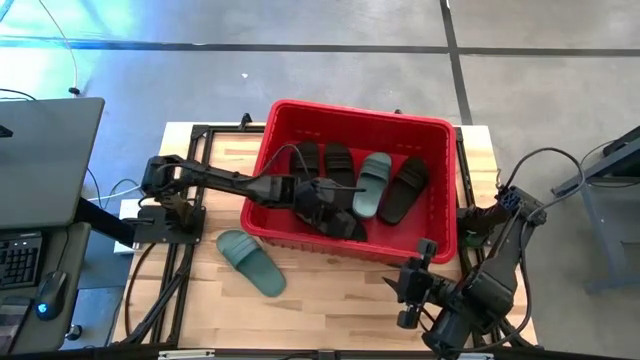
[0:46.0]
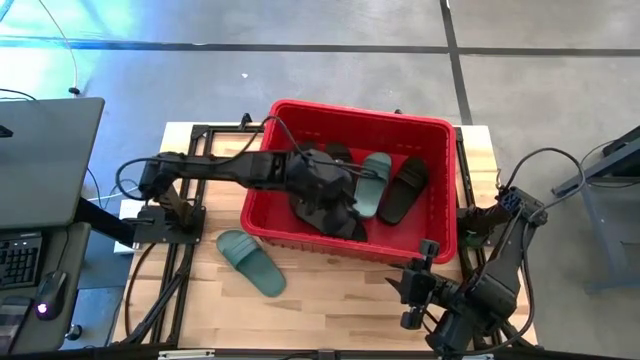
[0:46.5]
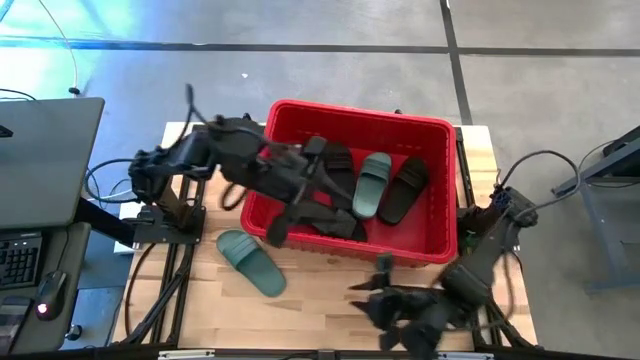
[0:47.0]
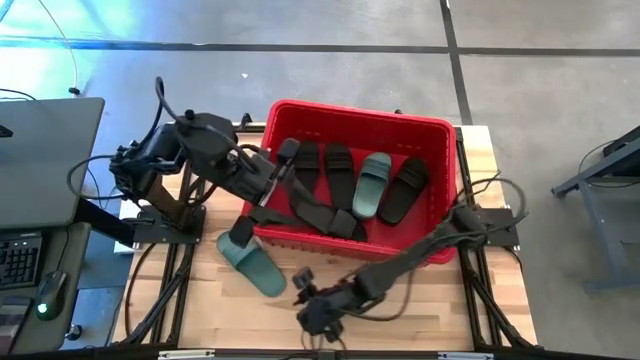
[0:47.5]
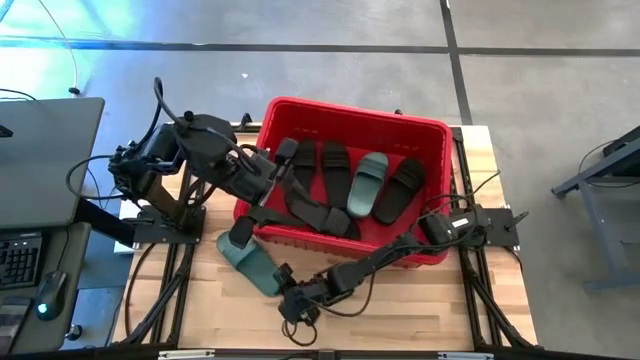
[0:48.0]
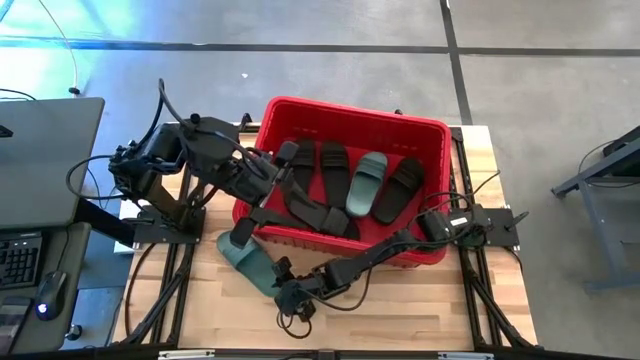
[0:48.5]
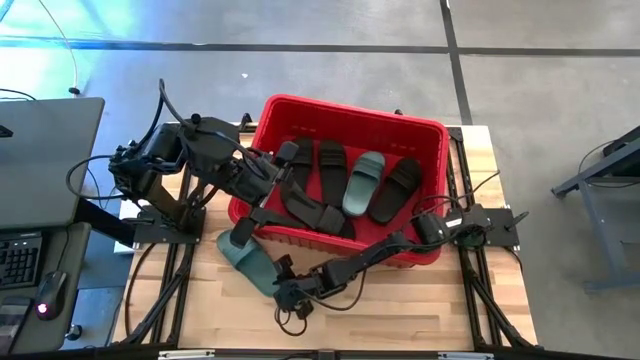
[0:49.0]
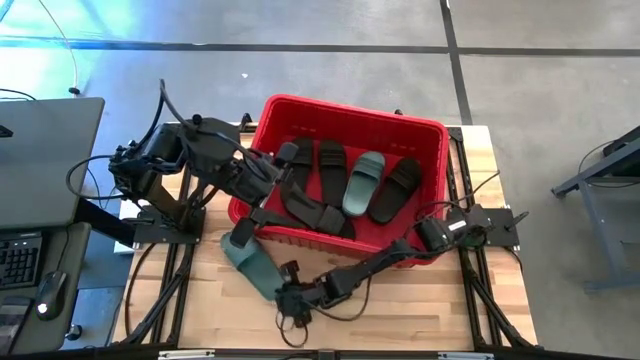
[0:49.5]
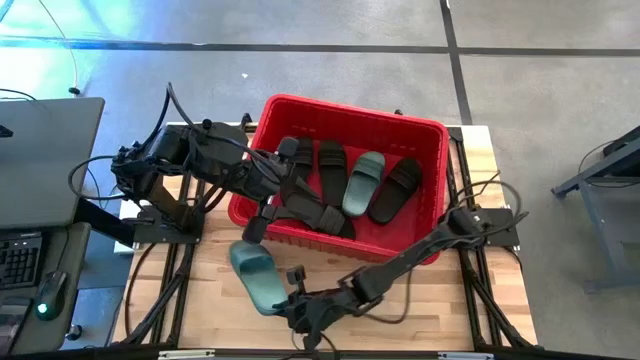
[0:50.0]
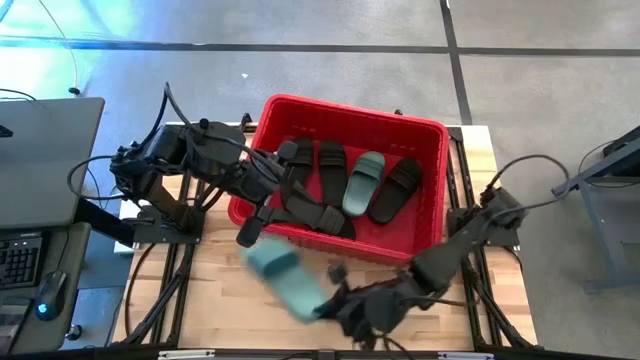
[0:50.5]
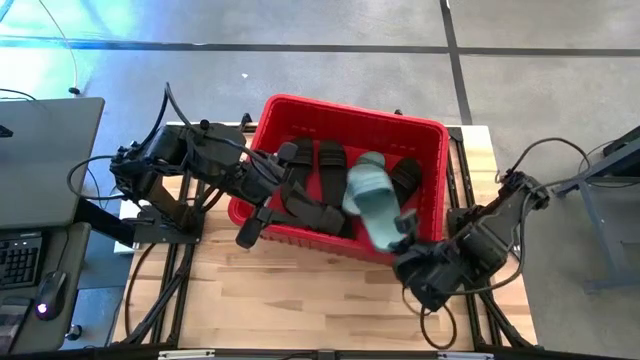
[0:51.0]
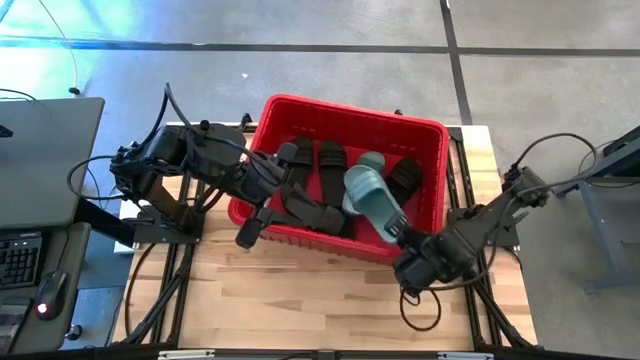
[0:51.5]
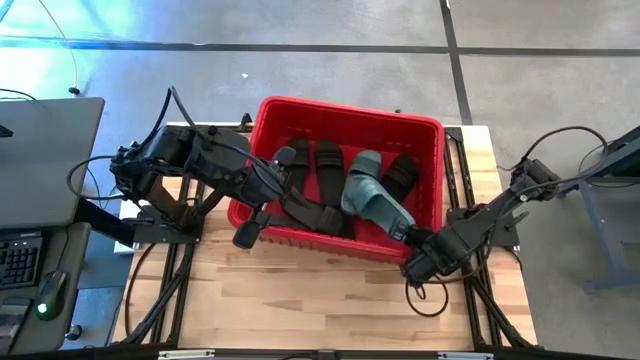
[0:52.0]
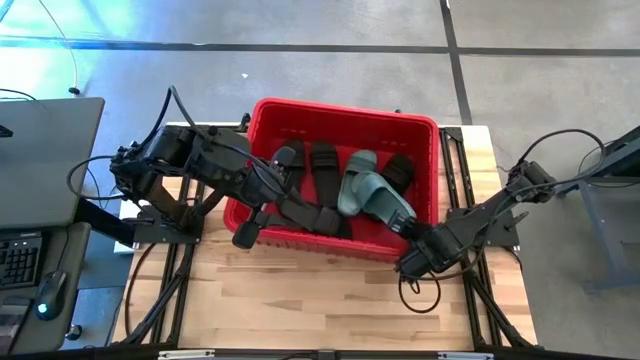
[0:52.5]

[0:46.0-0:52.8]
Task: Pick and place slides into bin
Put the green slide into the red bin

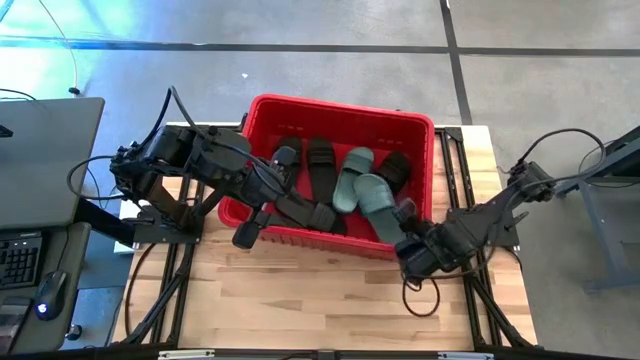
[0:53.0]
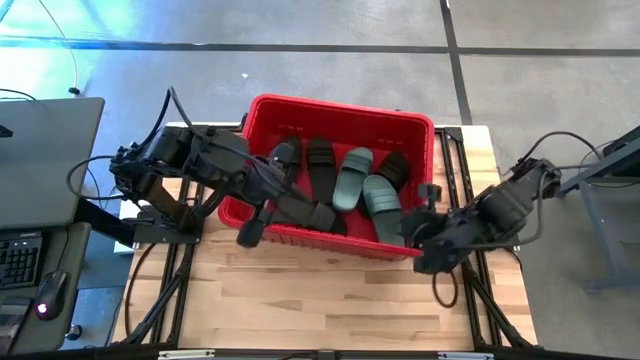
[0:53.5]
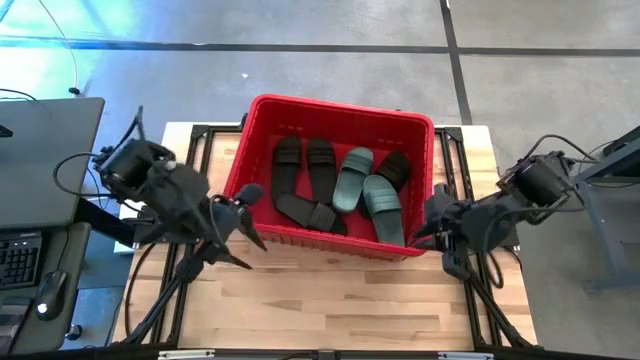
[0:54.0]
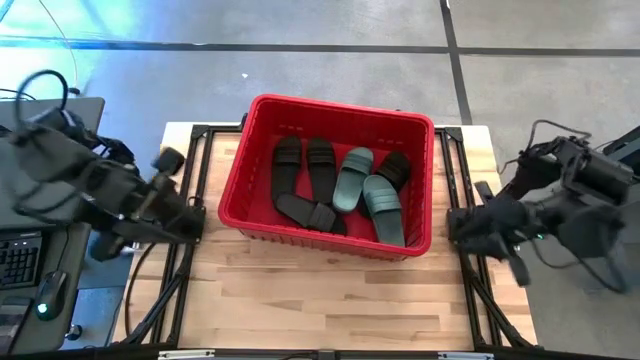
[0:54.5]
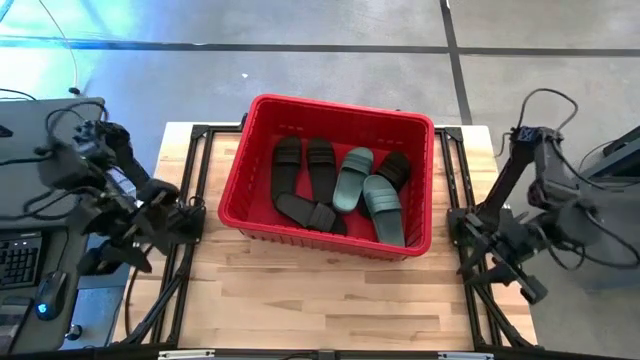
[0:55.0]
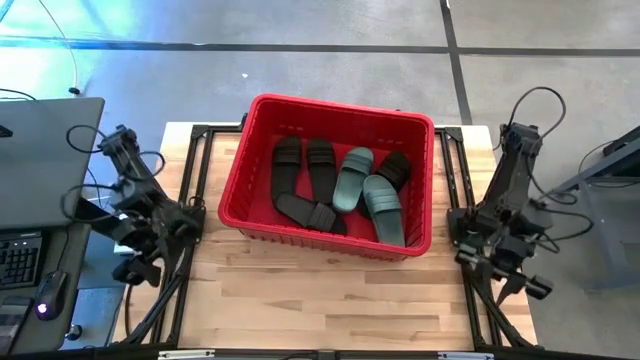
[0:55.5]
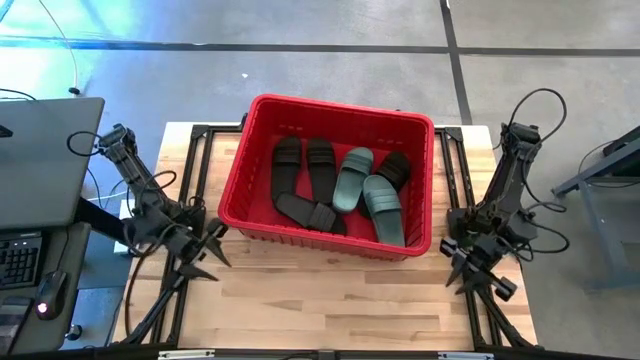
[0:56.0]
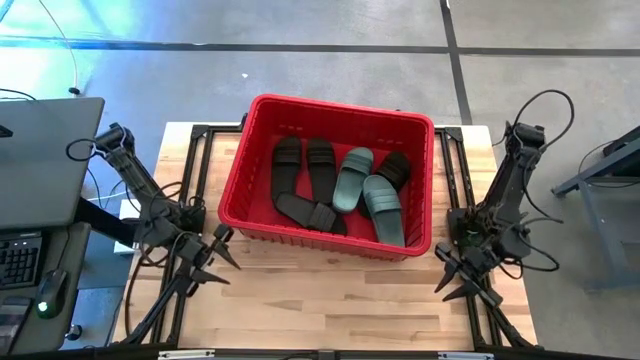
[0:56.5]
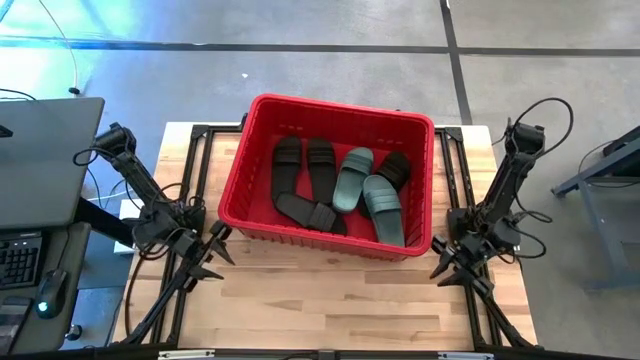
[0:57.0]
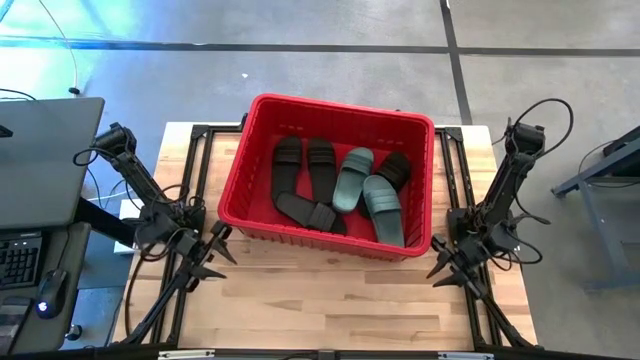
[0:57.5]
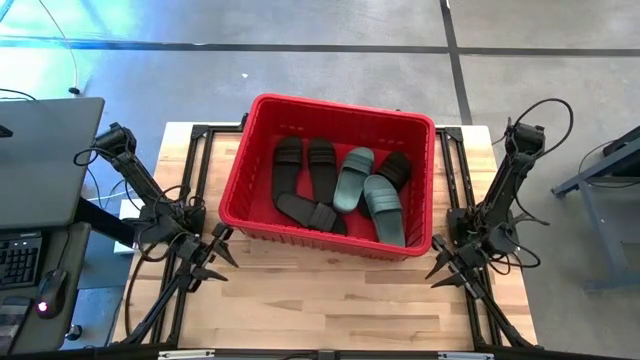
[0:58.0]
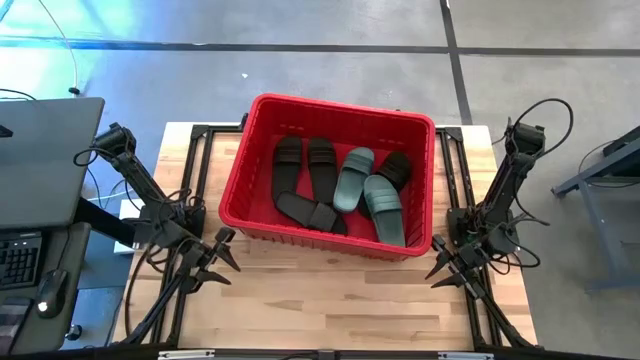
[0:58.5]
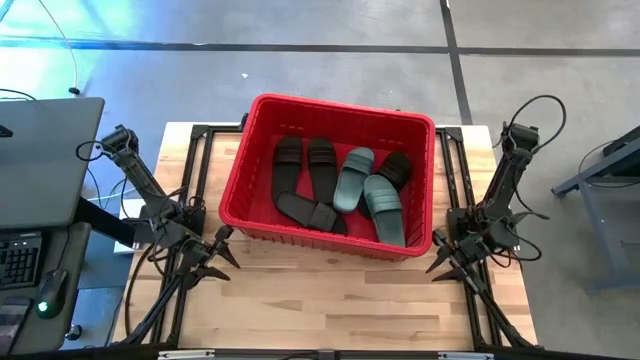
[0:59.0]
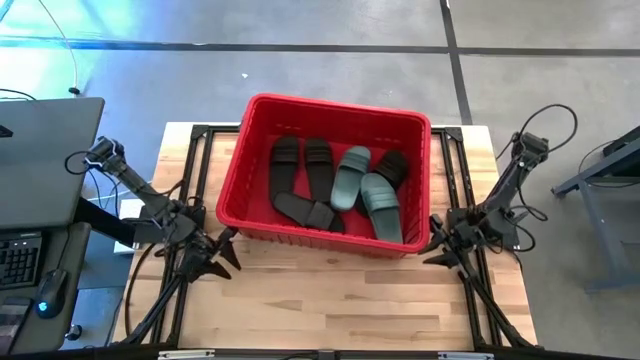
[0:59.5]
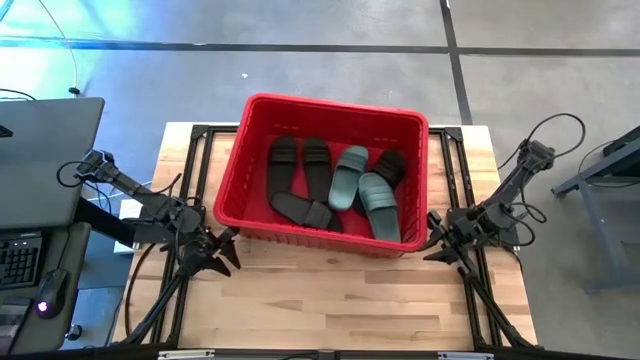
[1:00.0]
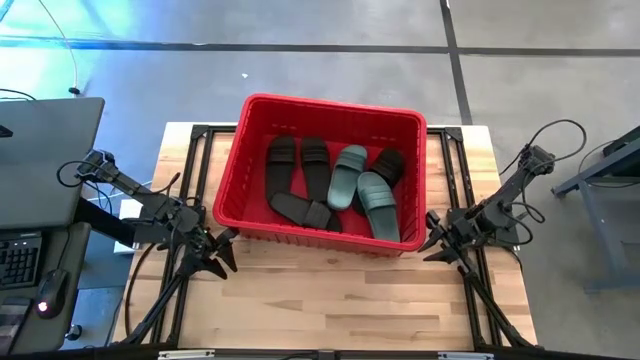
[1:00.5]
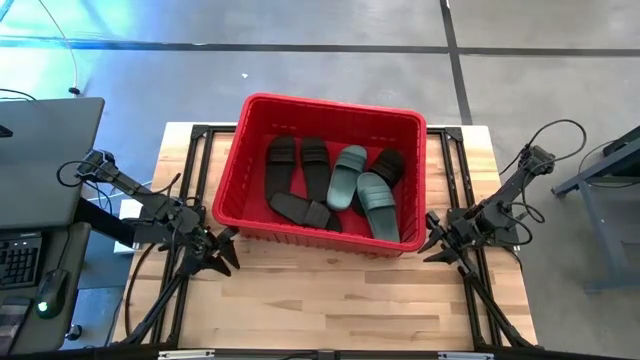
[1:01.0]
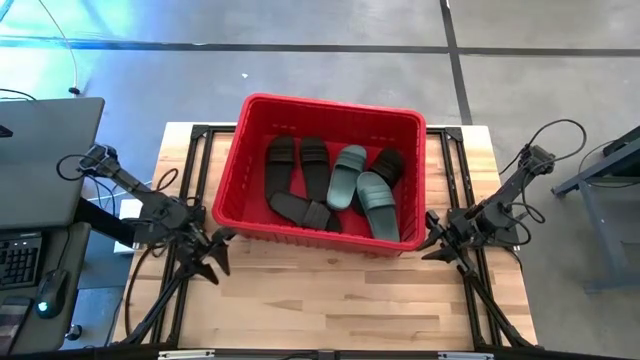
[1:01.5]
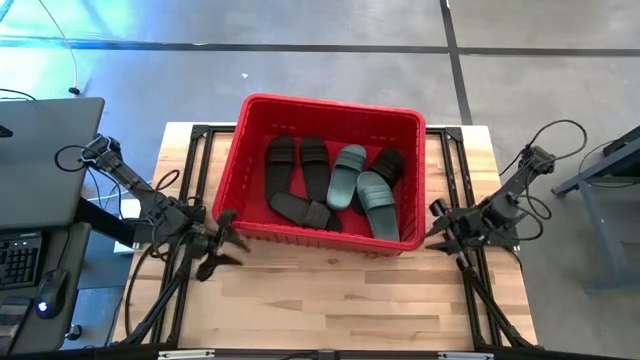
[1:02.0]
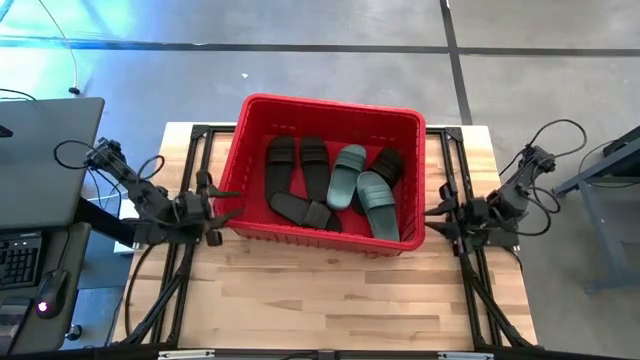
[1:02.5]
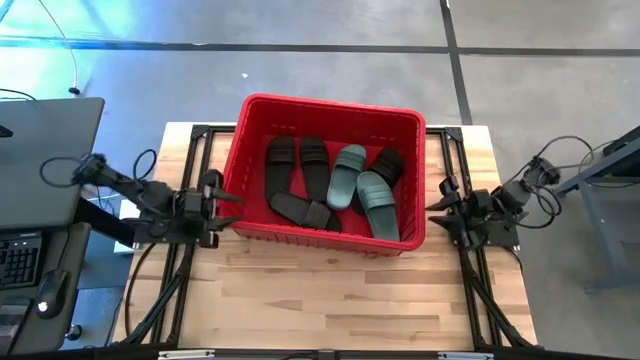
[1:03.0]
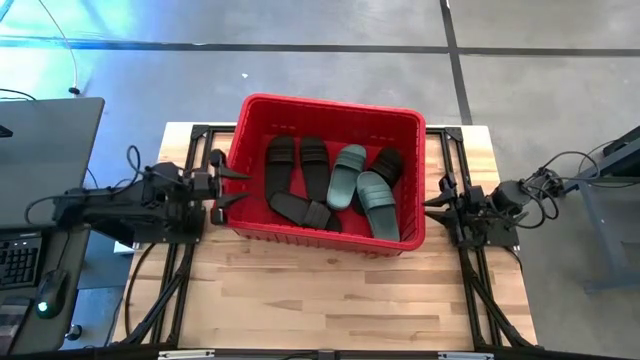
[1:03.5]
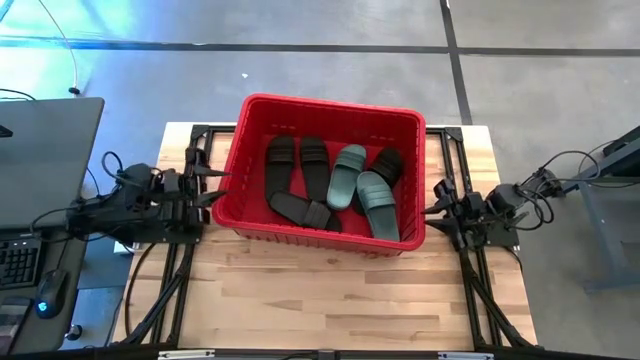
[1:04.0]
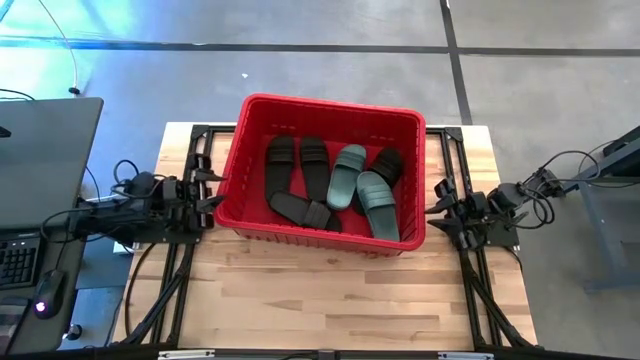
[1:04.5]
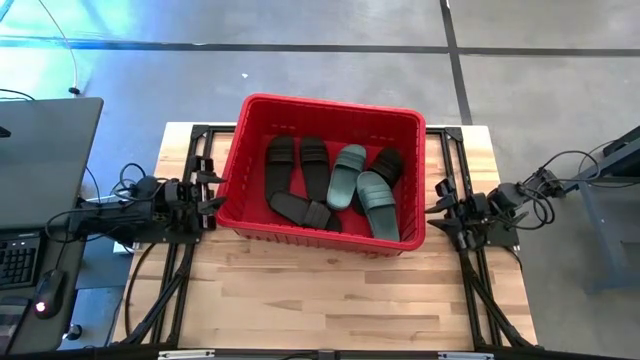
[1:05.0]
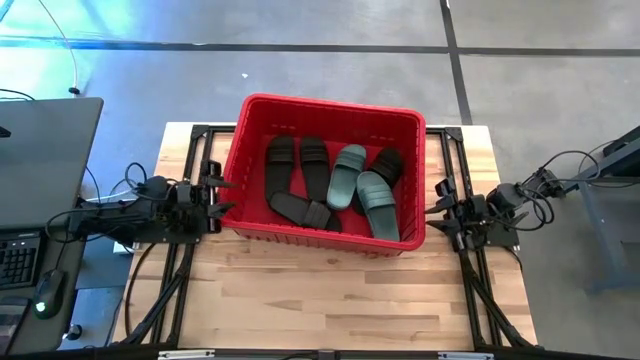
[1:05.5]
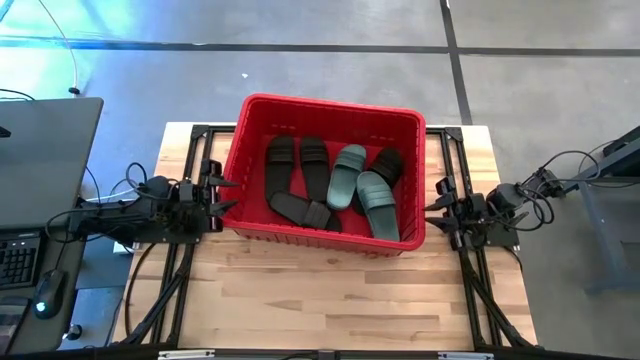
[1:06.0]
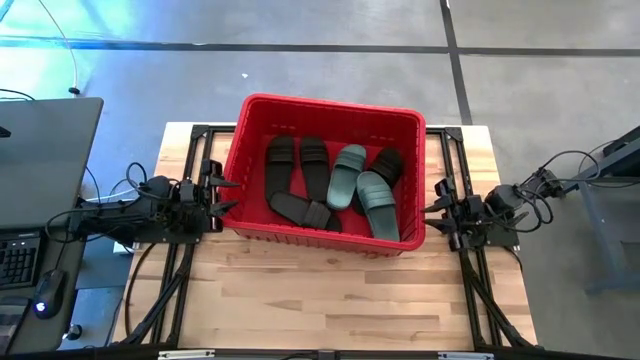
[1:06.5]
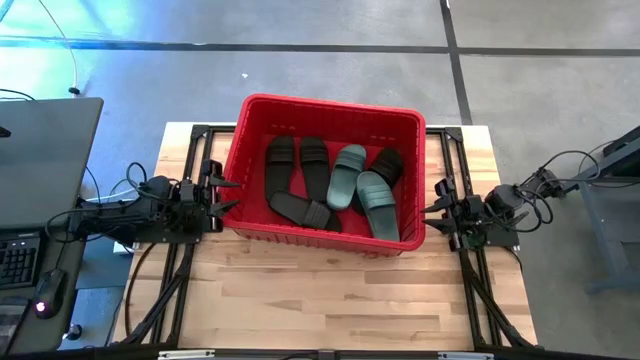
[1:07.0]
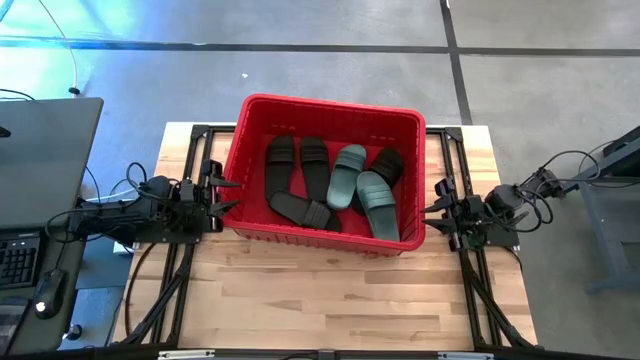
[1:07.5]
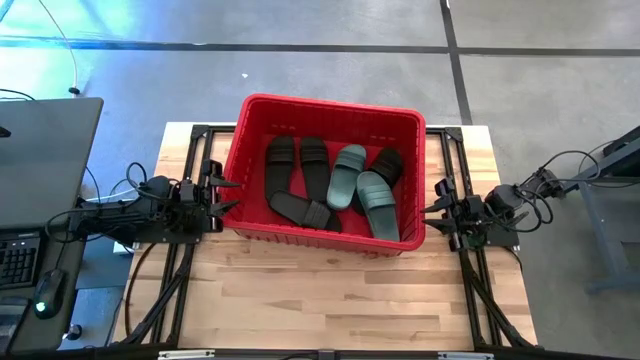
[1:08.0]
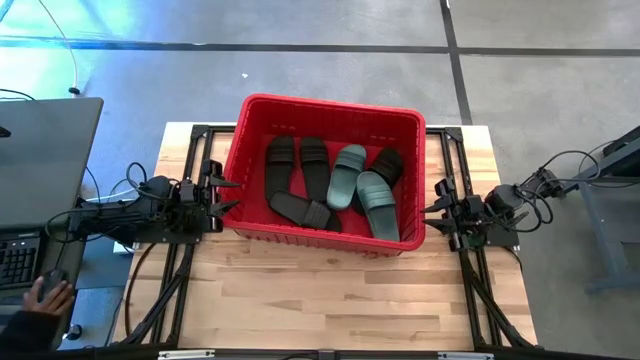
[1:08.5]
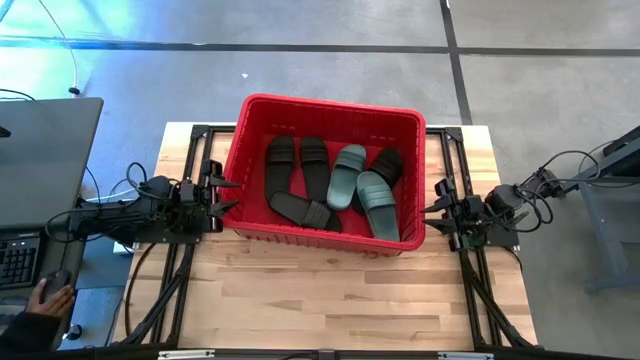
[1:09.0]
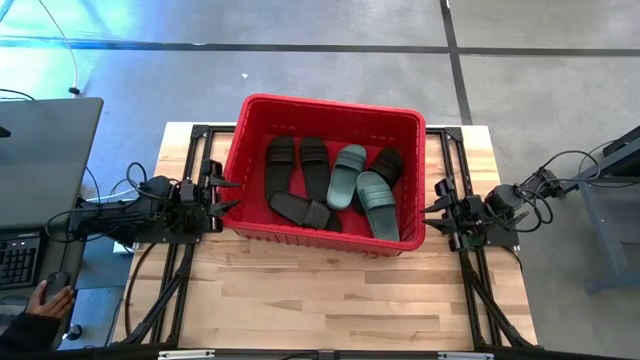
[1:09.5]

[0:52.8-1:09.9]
Return to Home Position
